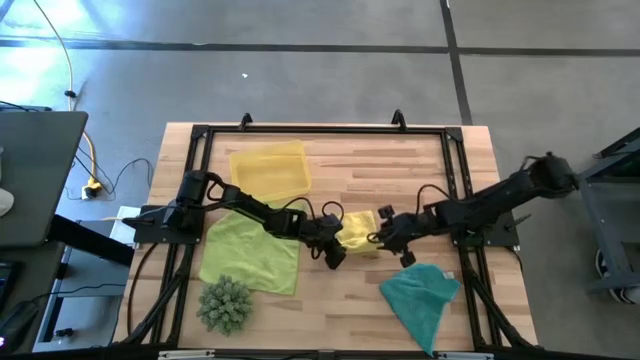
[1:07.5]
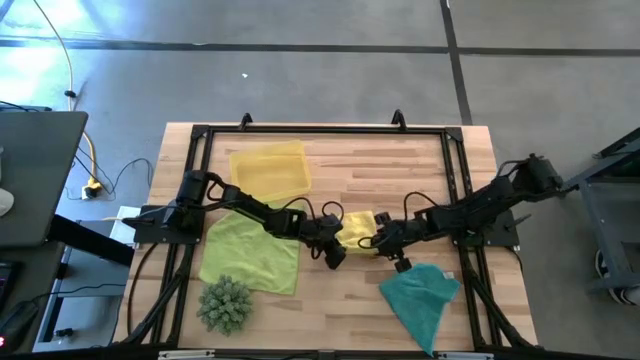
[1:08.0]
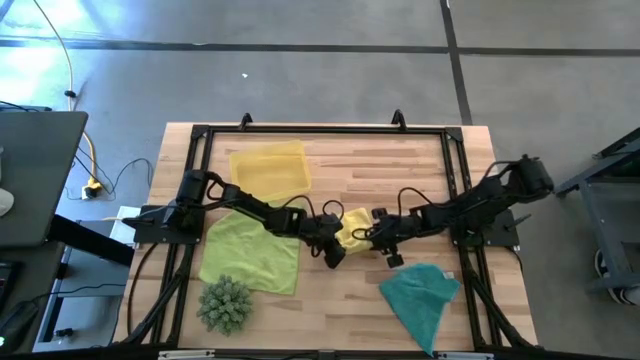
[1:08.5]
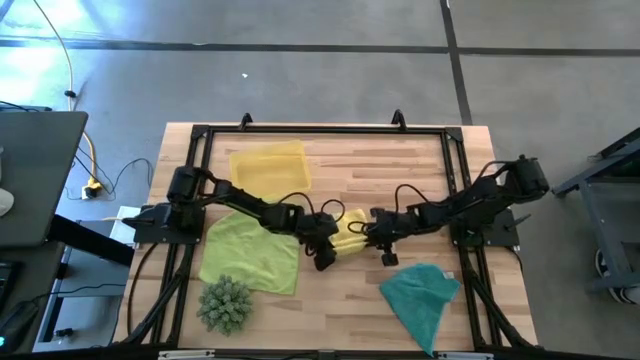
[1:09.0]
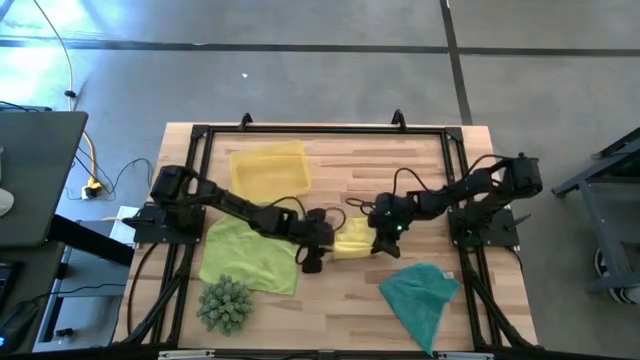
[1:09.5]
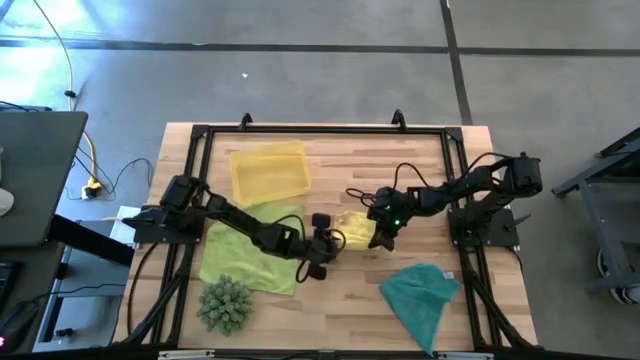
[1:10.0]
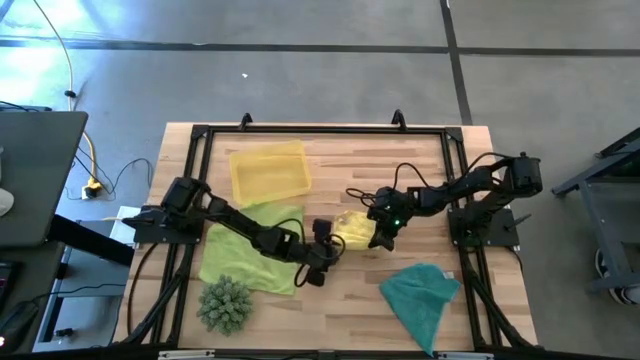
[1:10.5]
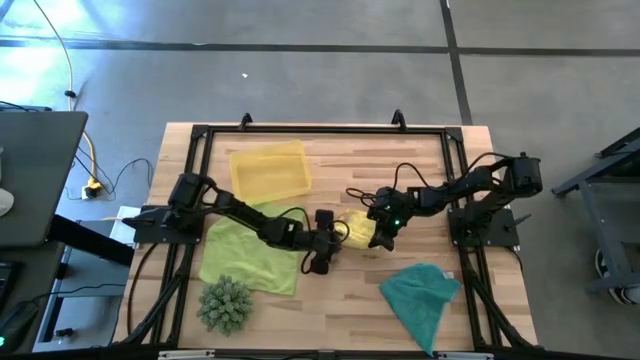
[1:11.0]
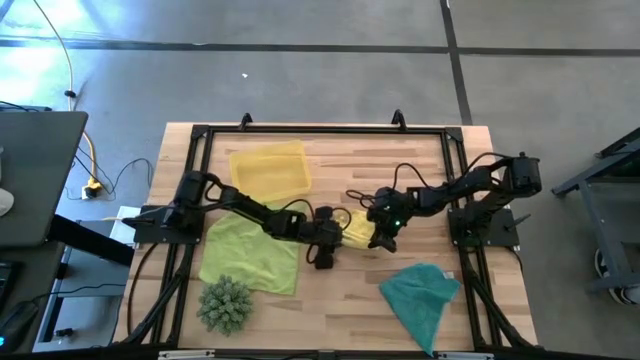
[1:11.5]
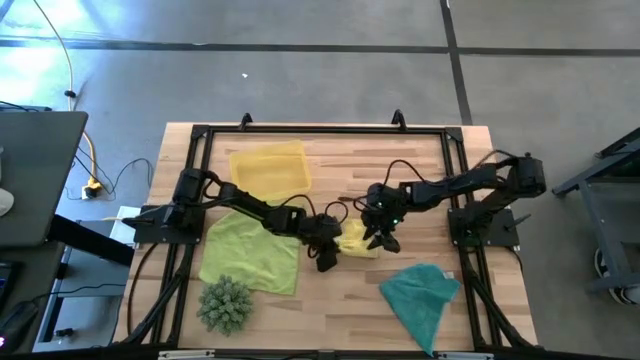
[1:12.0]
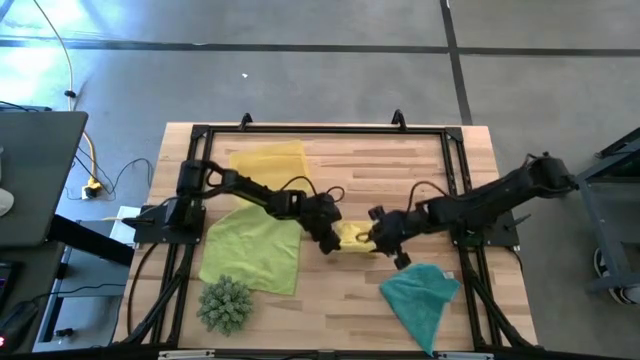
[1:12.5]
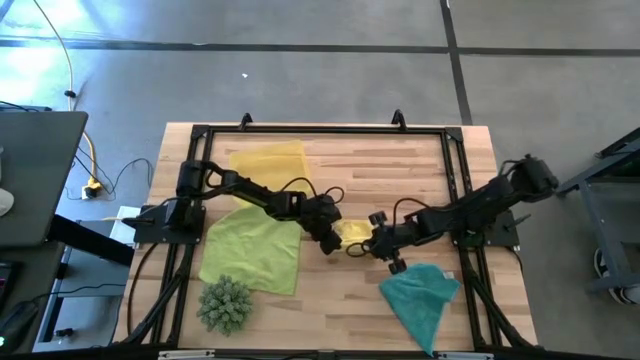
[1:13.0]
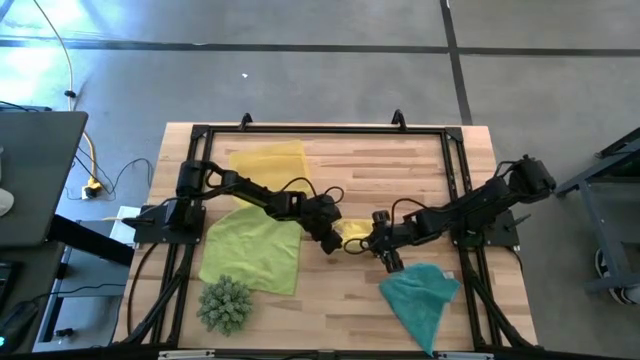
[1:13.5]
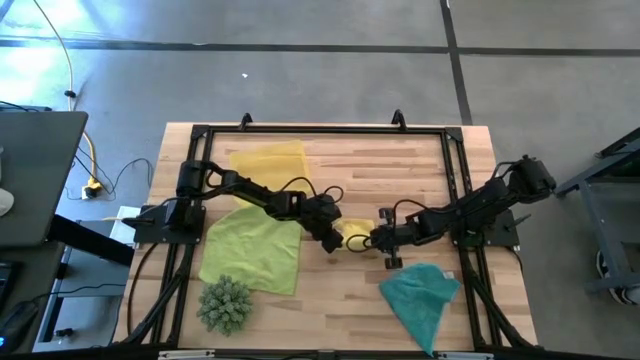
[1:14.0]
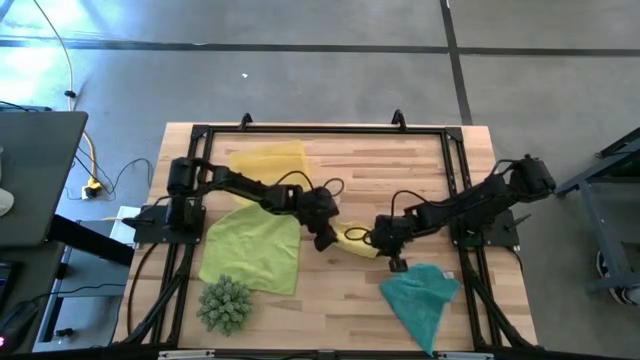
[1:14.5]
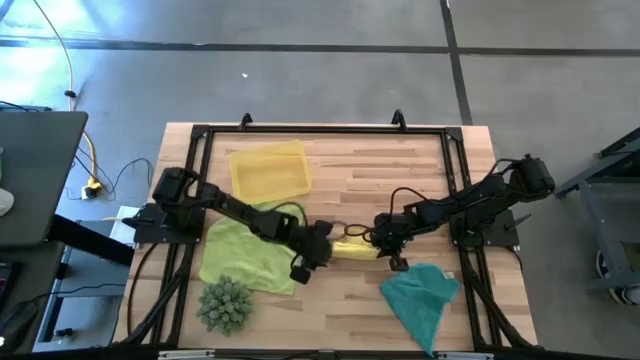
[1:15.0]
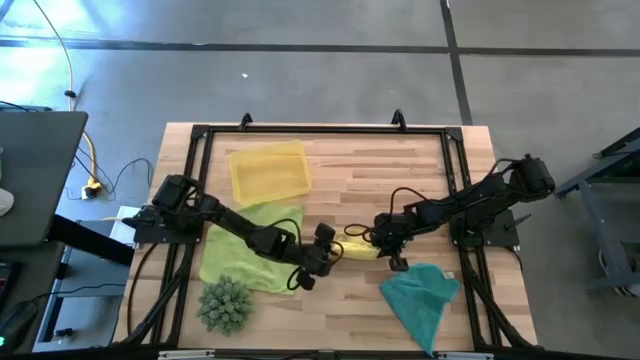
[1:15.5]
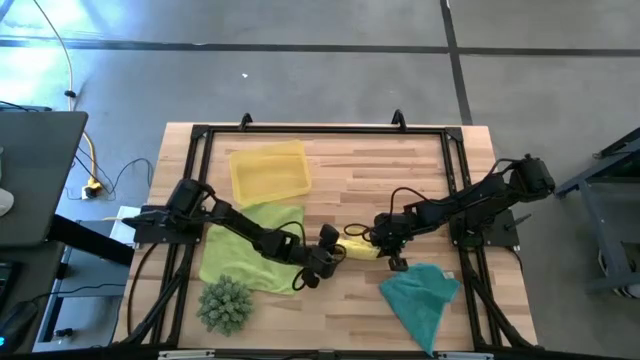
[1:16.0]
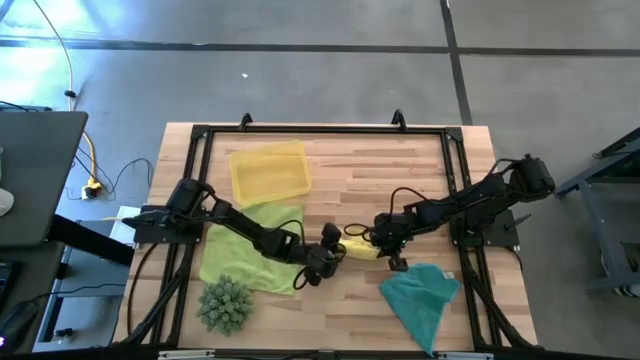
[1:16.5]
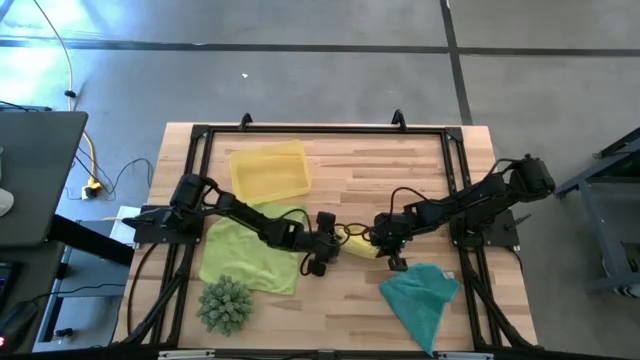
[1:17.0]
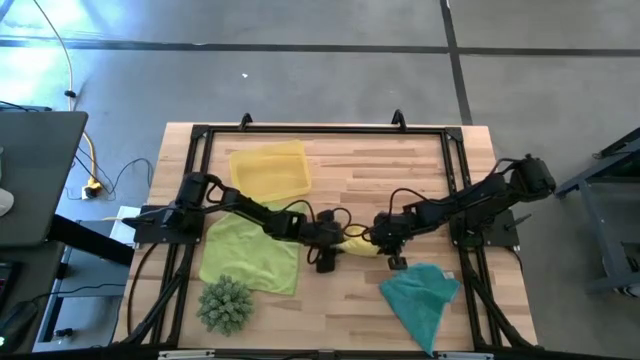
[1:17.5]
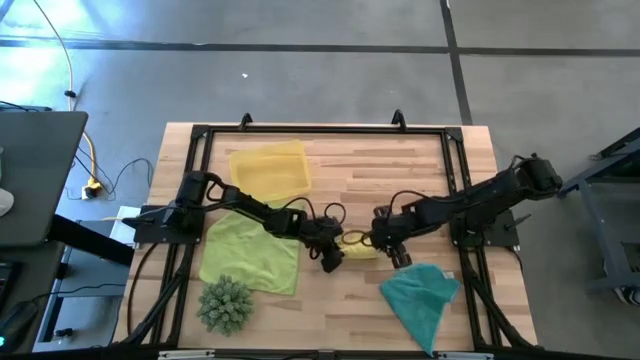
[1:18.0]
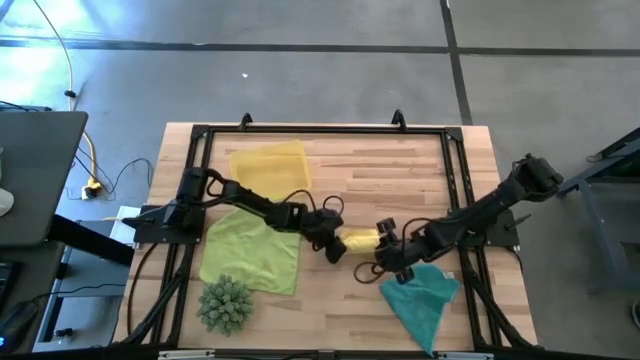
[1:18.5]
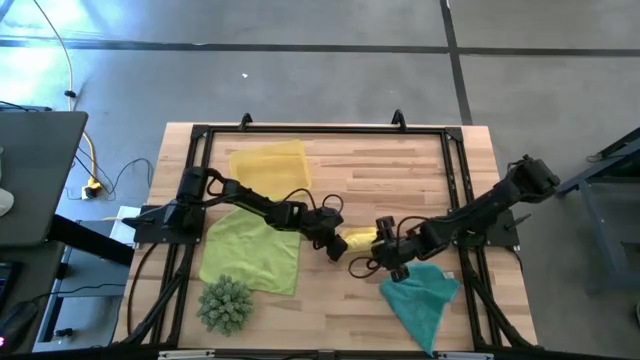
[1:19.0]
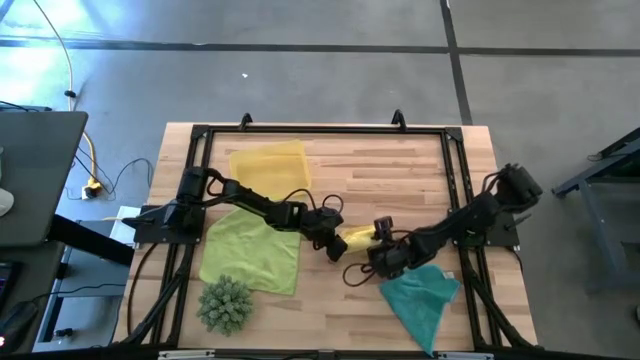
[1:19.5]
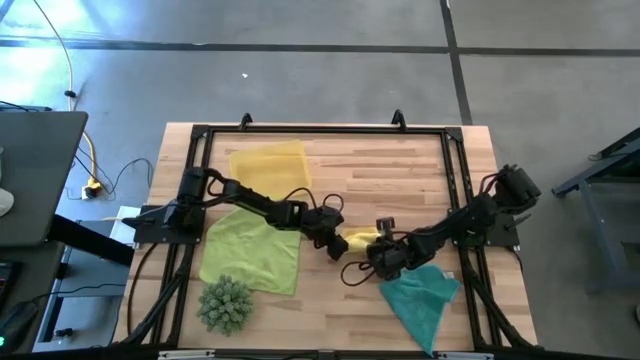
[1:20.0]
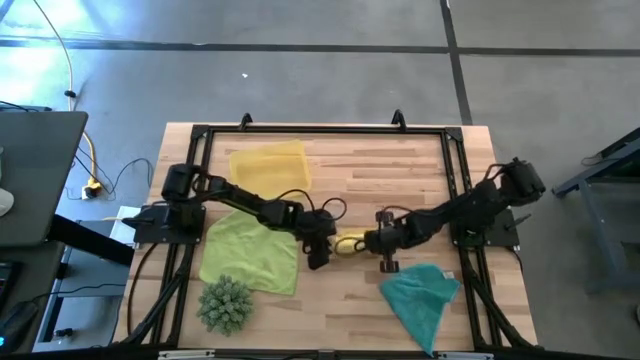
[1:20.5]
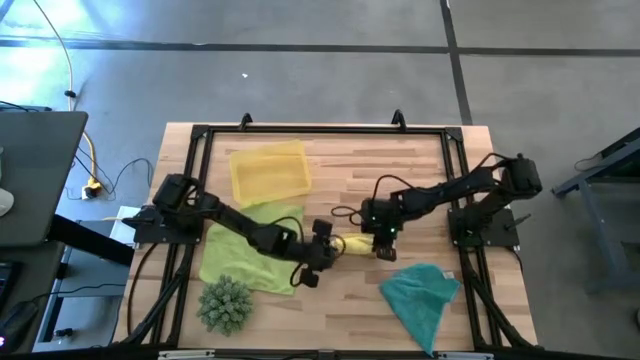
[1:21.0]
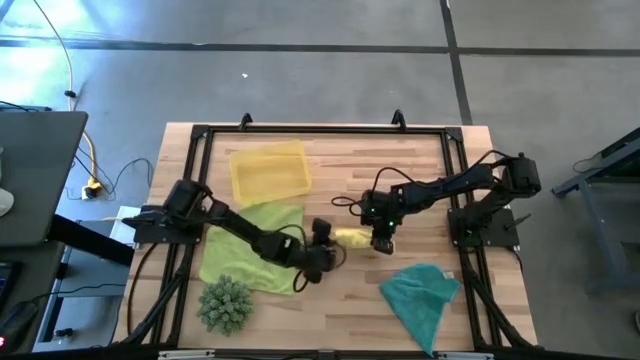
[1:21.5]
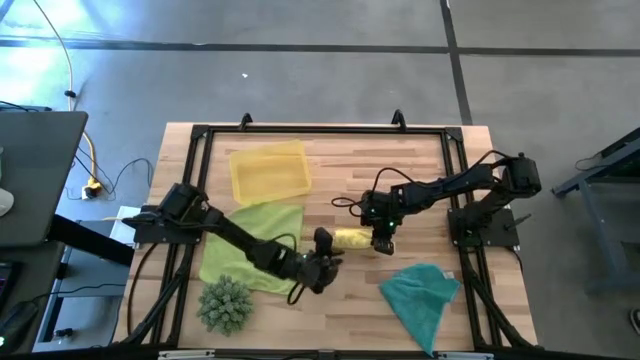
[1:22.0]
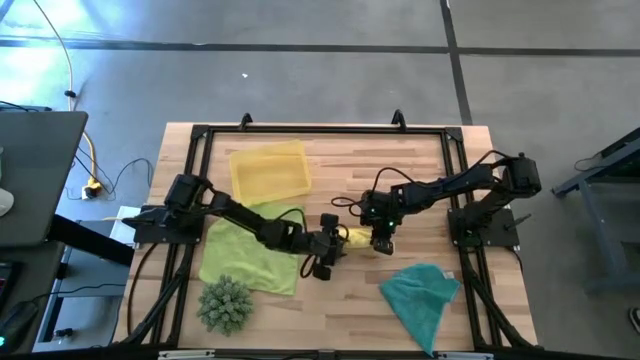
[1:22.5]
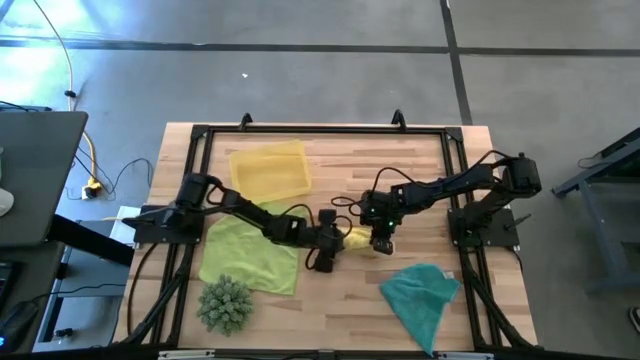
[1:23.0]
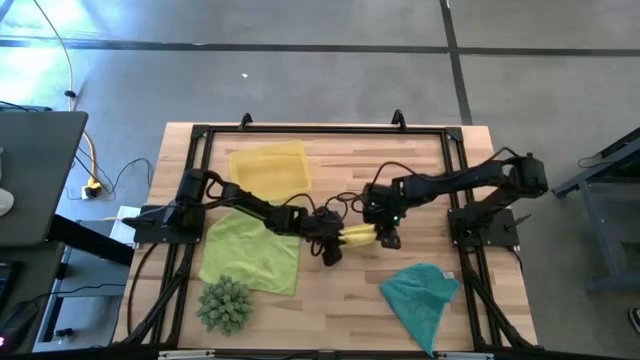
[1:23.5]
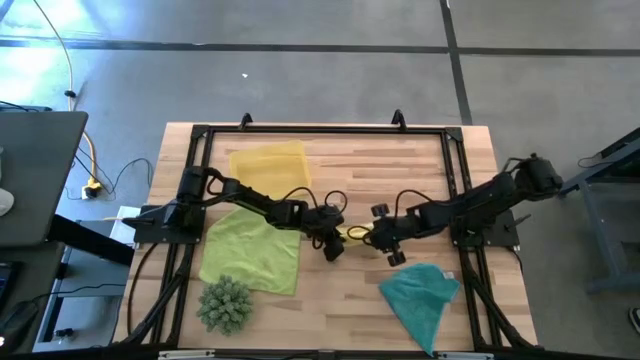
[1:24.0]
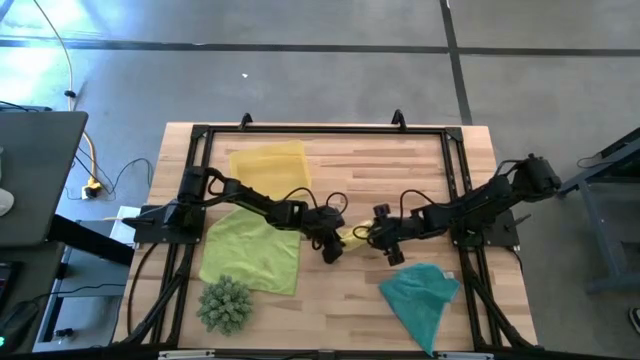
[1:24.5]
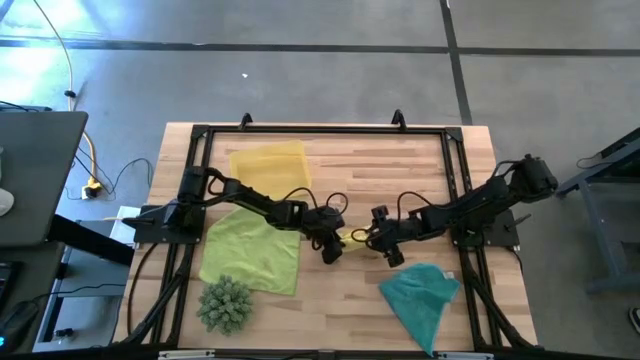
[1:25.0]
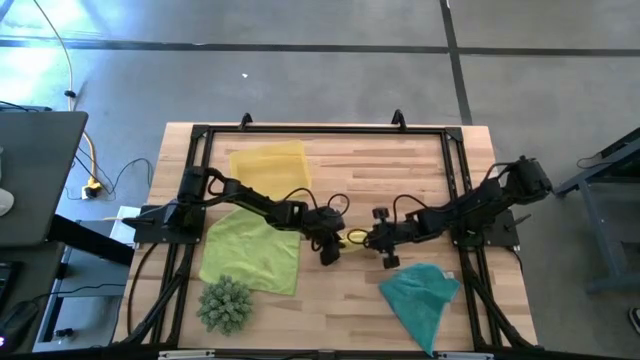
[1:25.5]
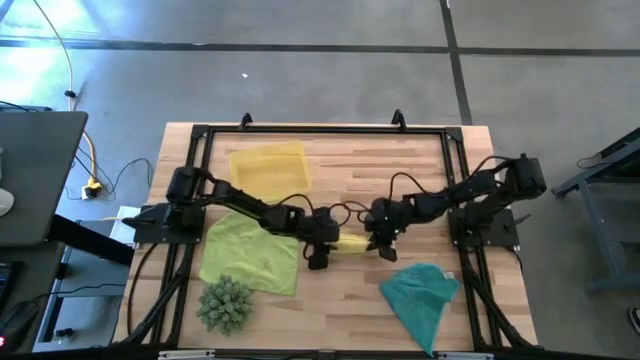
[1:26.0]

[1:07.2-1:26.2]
Task: Roll microfiber towels into tight, uniform cylinder then place into a basket
Roll the yellow microfiber towel

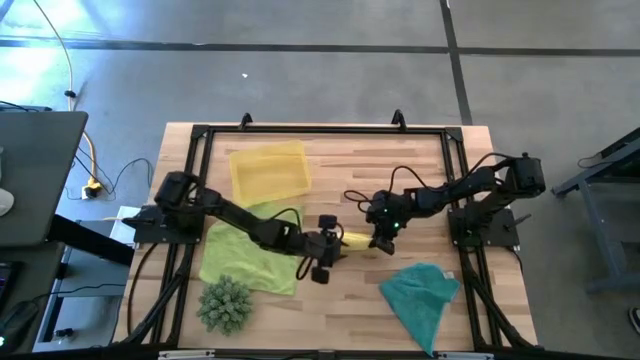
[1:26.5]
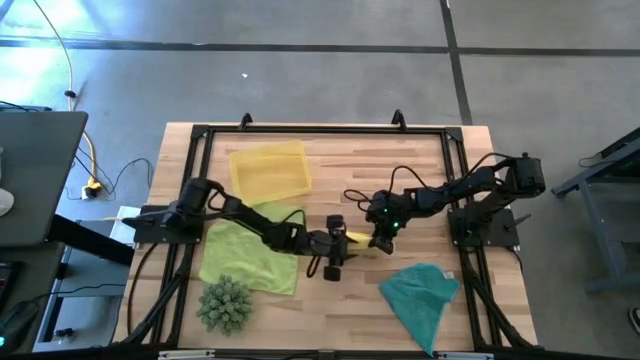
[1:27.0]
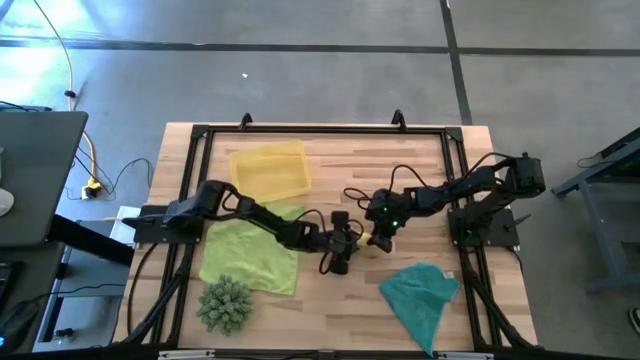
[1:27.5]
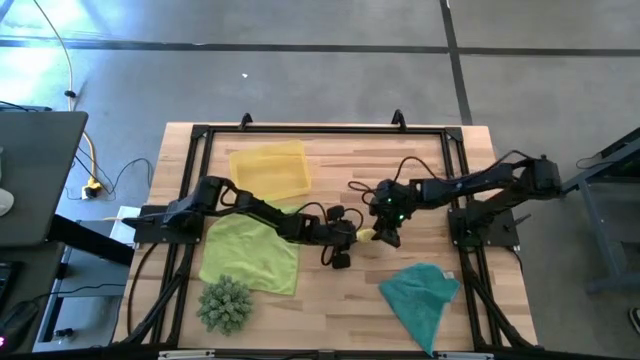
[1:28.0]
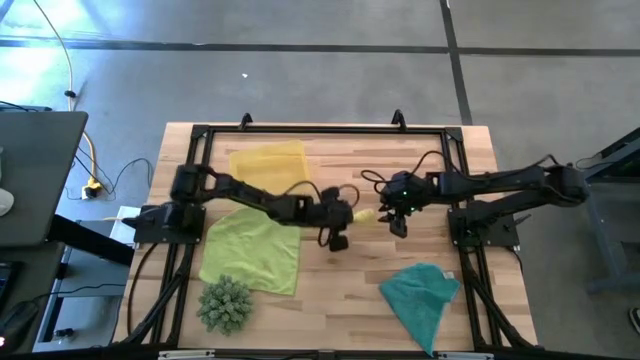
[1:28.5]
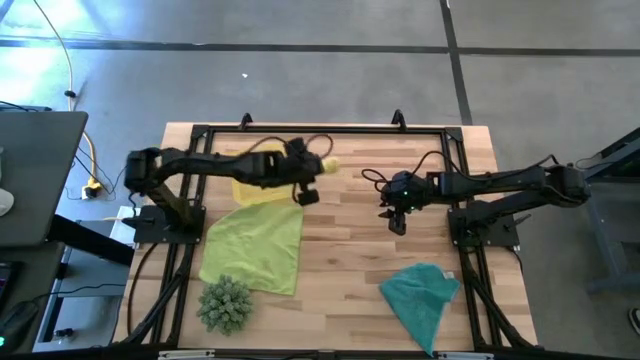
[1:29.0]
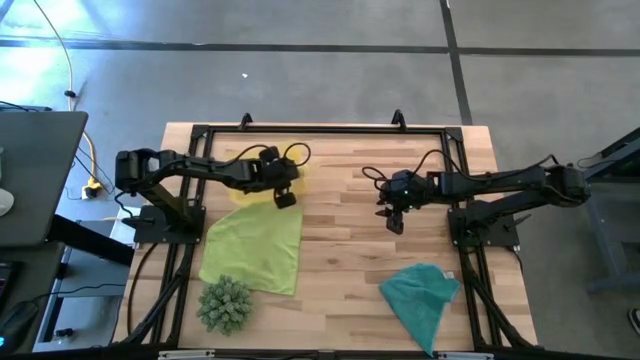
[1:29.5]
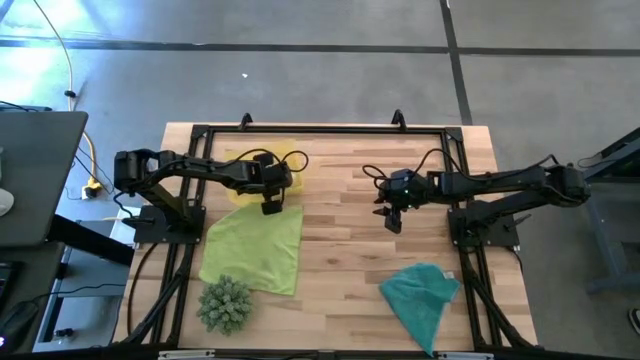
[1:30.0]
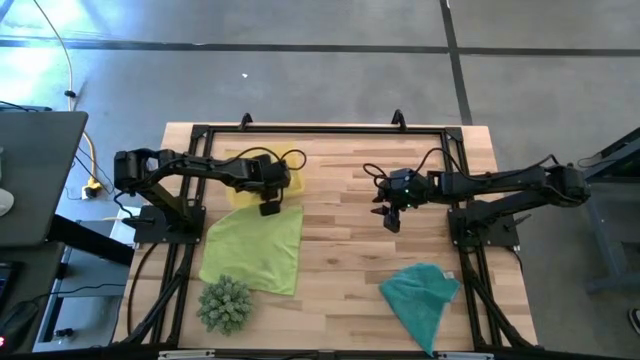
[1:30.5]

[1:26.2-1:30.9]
Put the yellow microfiber towel into the yellow bin
